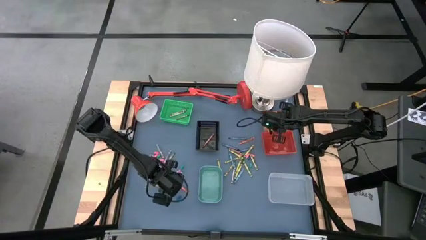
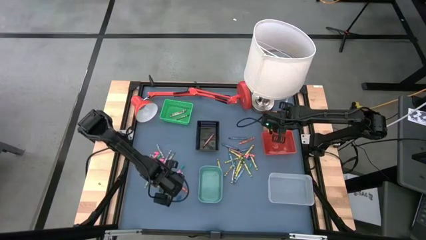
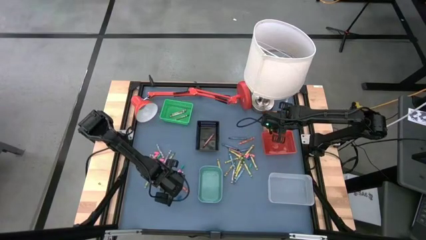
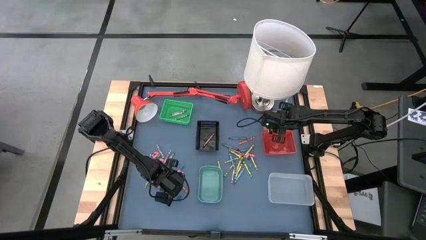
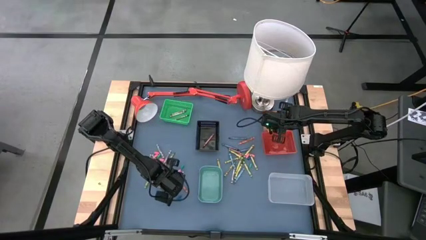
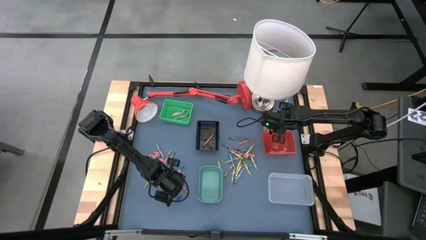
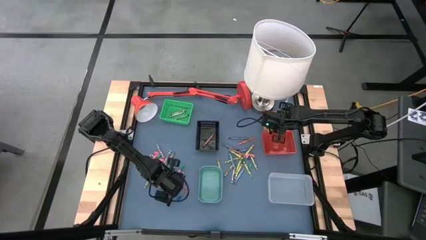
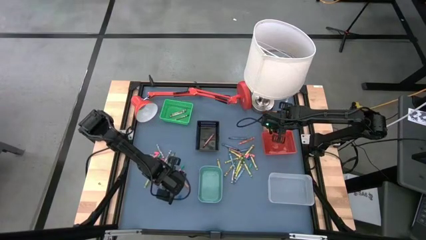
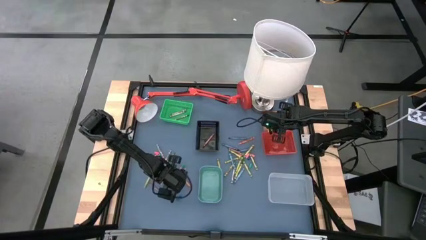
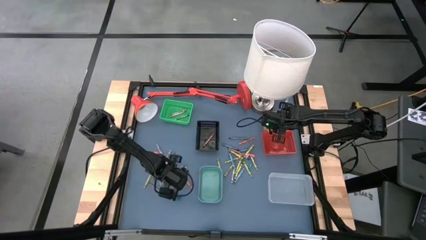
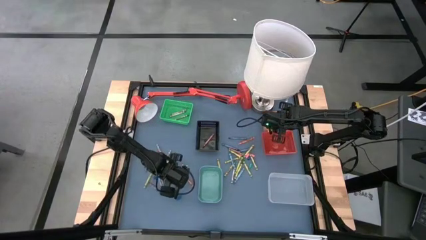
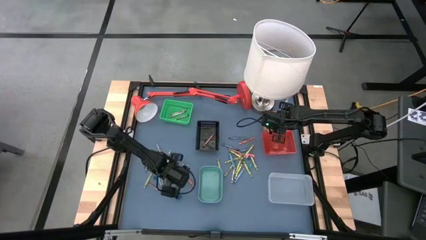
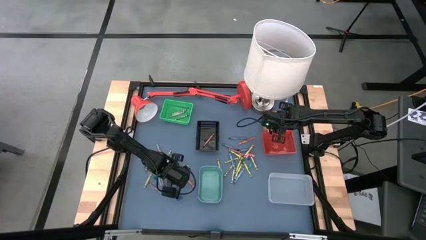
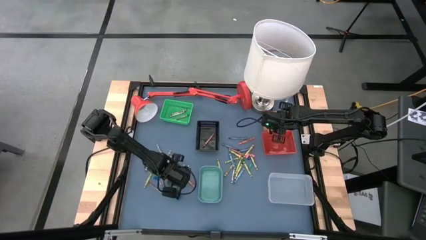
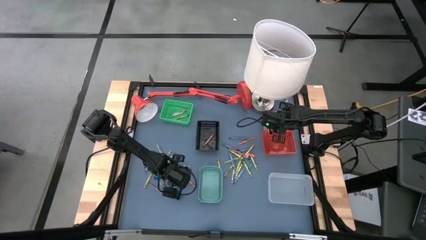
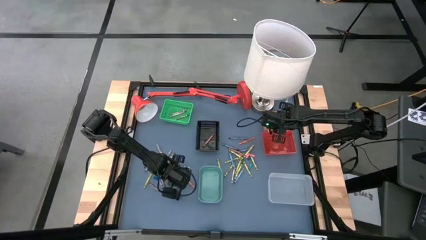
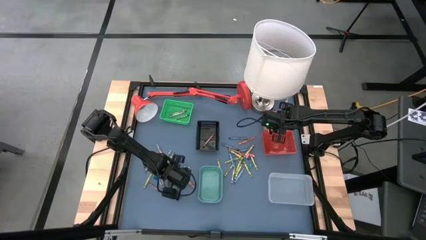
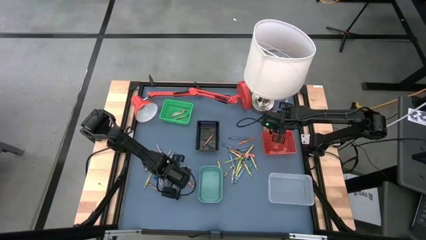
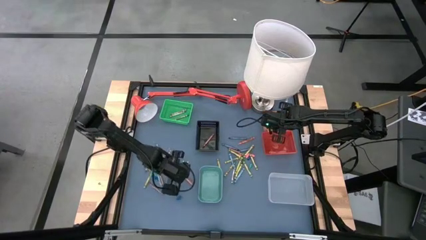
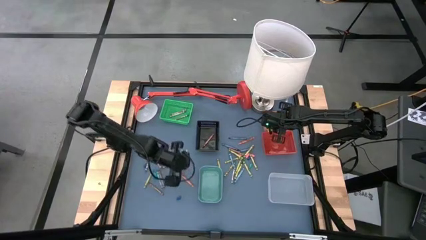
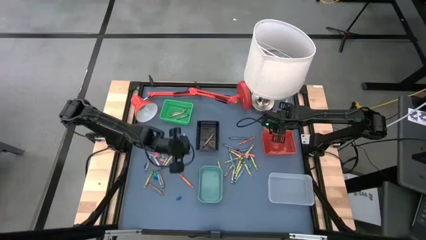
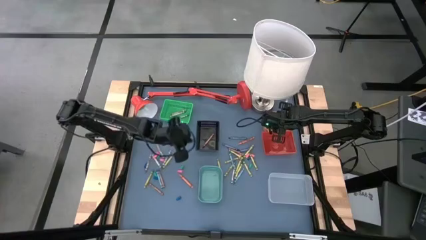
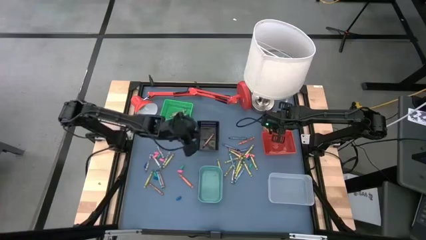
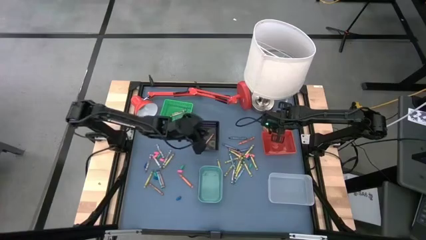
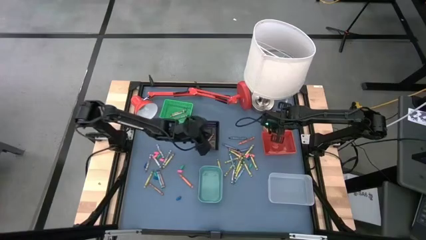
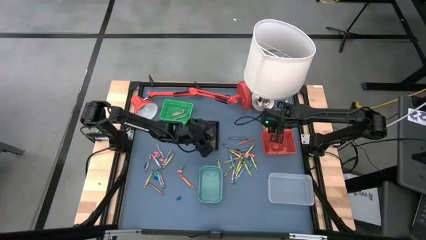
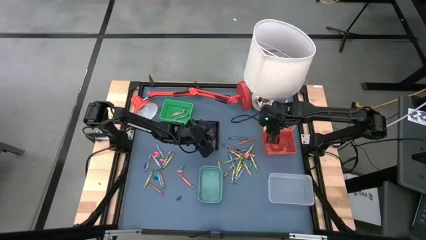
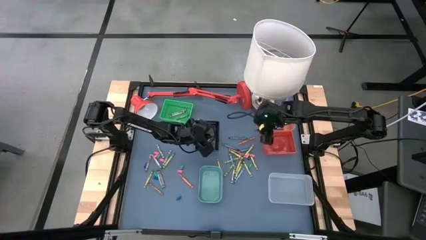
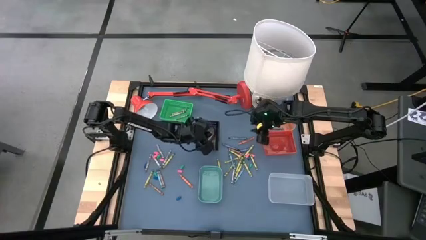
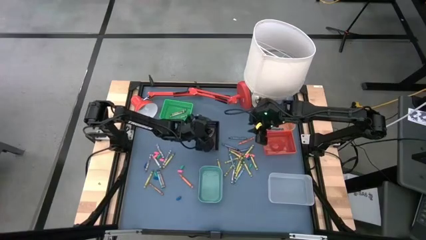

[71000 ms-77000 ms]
Task: Sort crayons
Put the brown crayon into the black bin

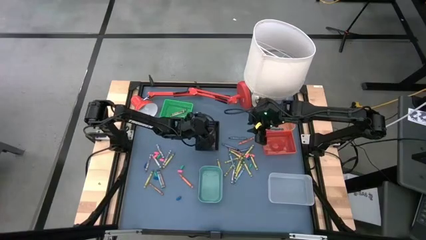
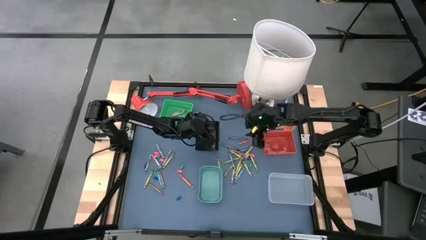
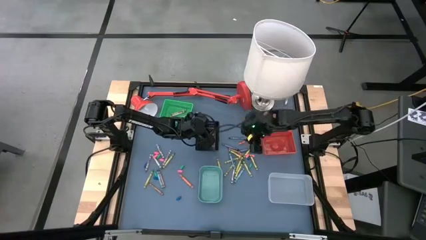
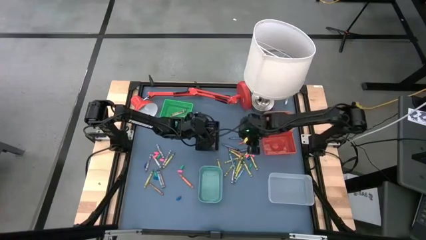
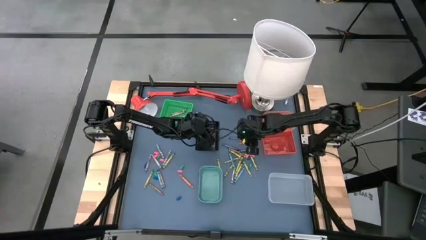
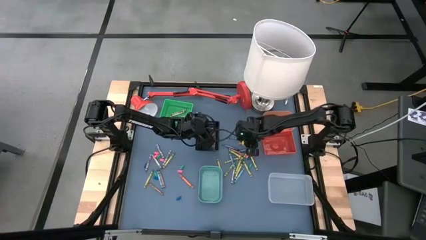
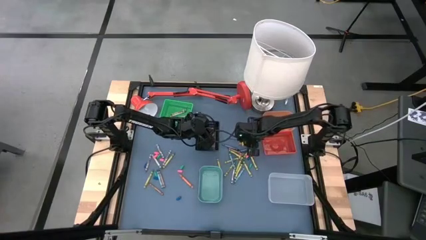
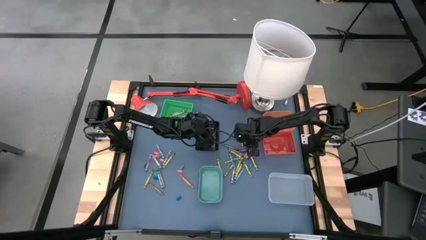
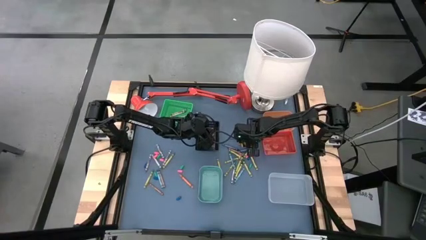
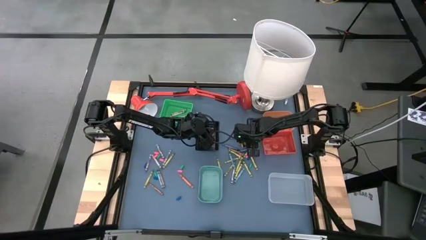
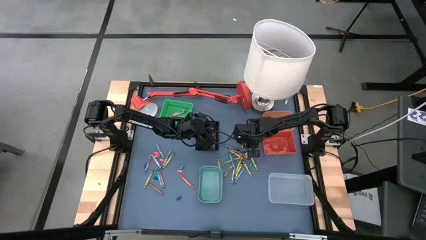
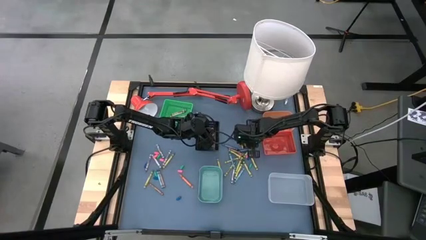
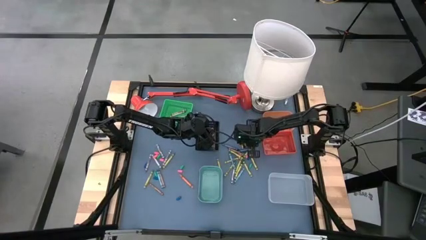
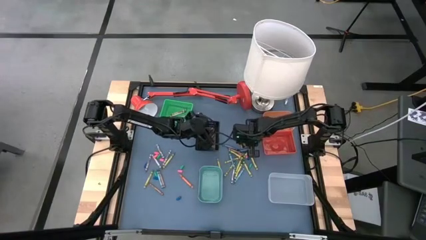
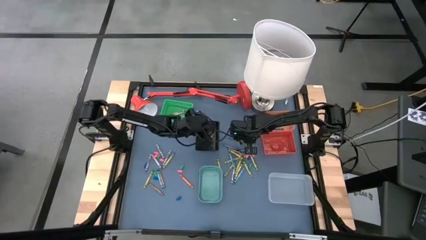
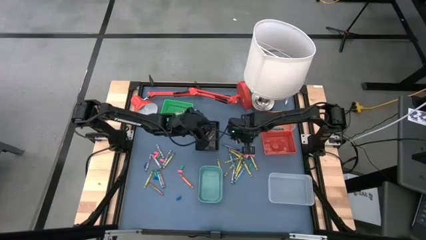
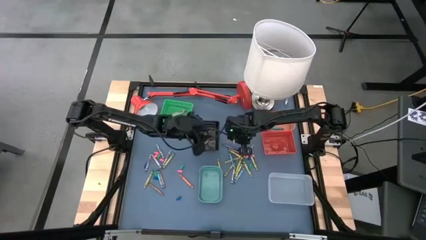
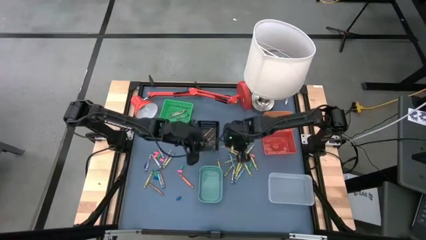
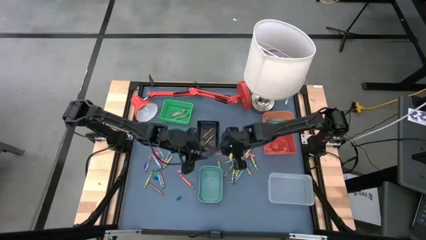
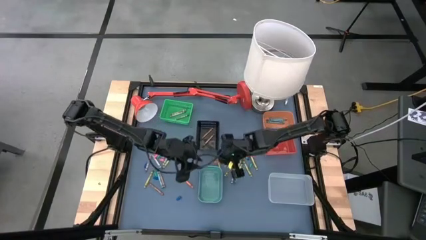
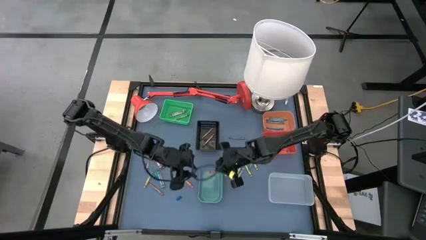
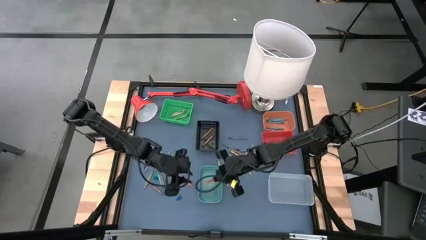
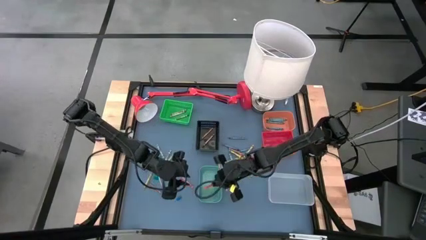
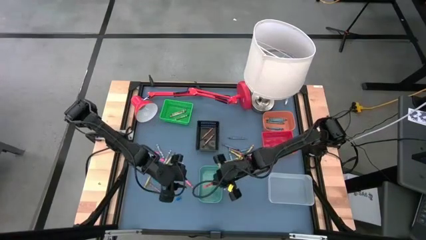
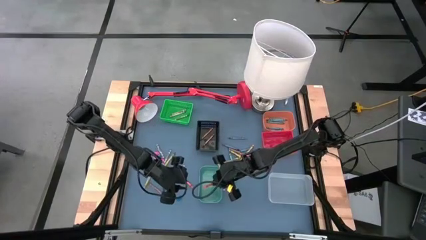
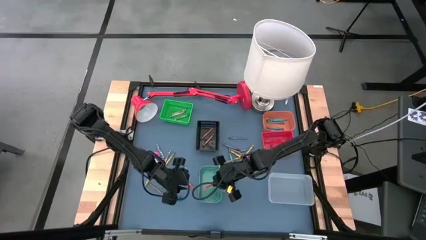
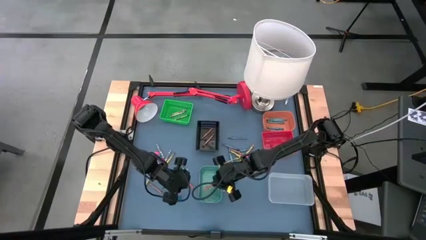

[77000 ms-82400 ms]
Put the orange crayon into the light green bin

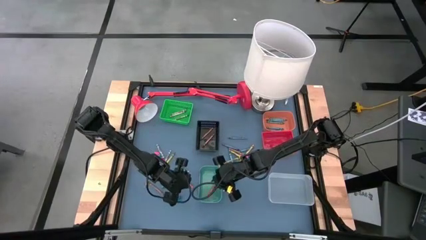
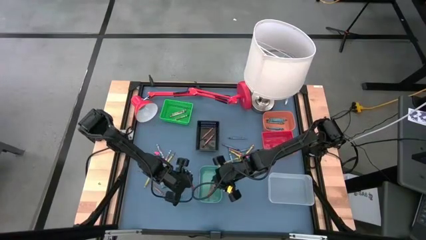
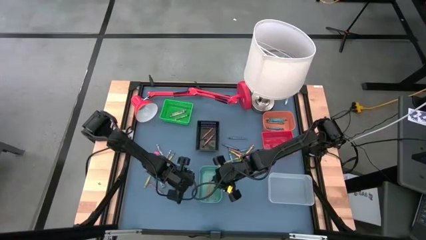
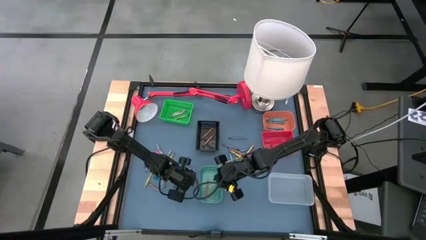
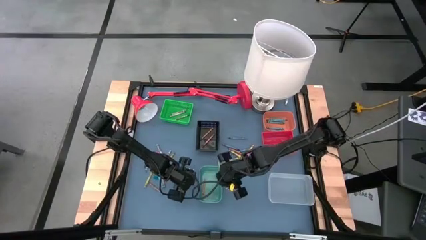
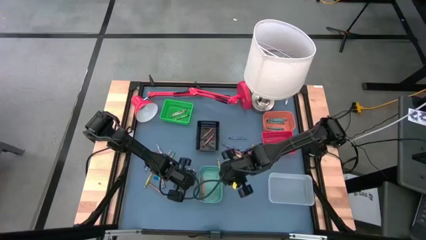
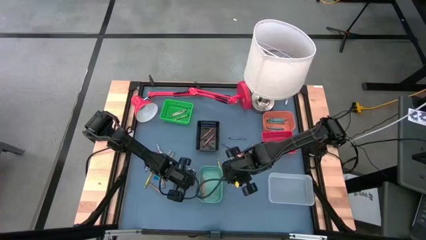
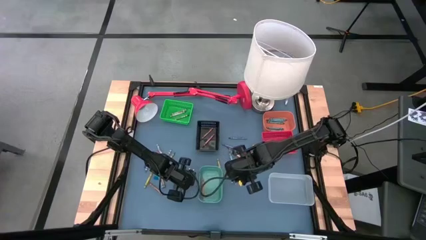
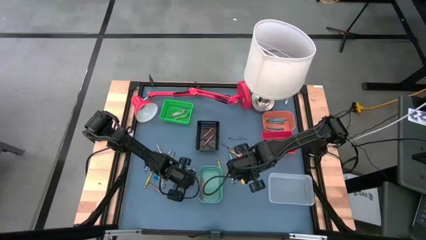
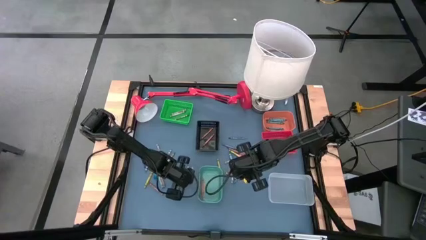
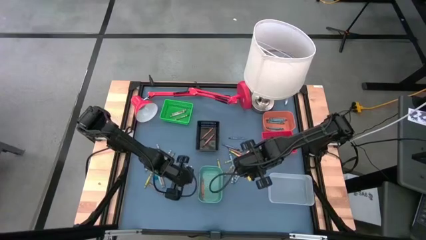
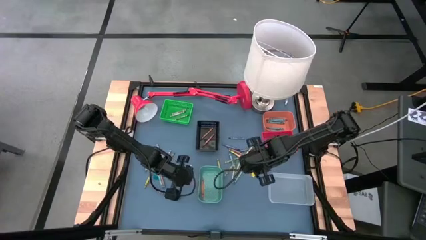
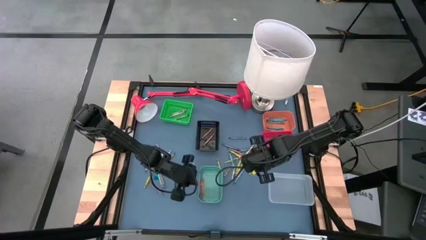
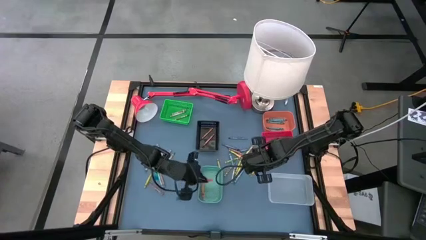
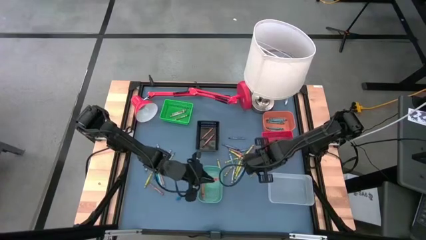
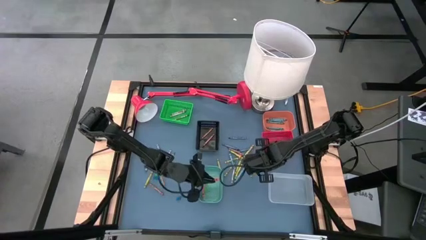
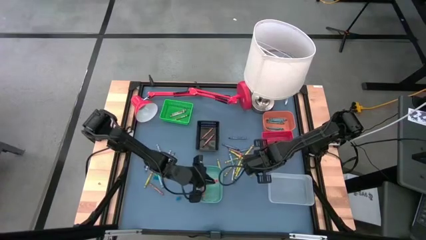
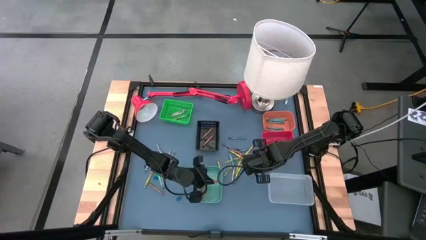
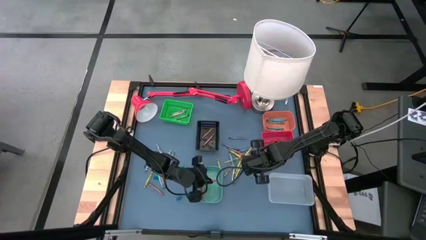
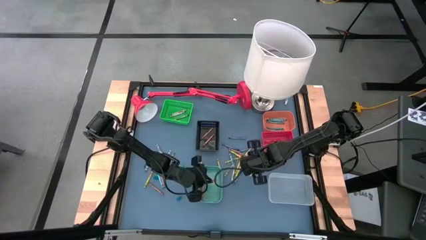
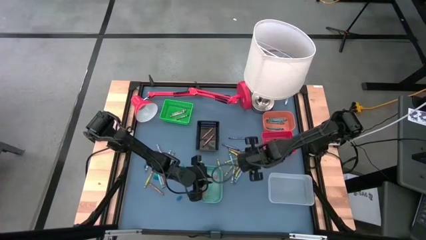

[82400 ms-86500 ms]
Put the orange crayon into the light green bin
